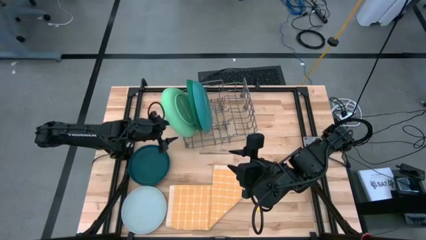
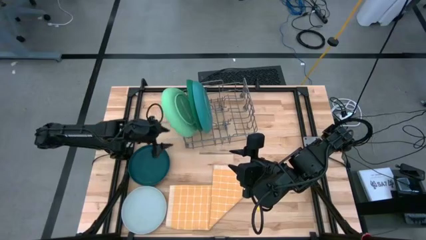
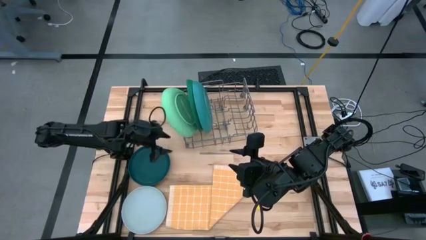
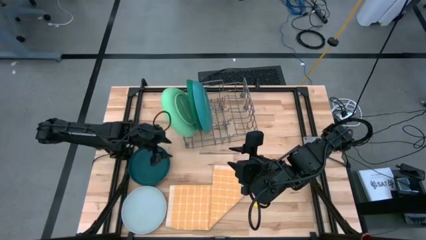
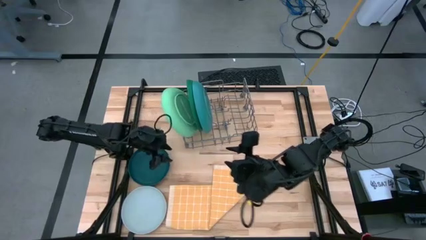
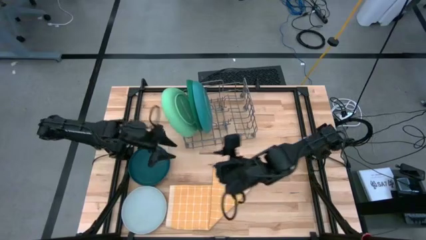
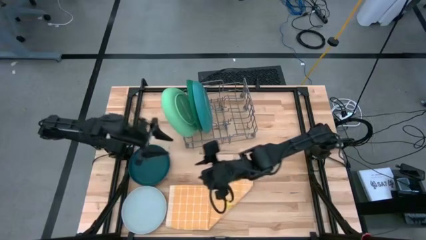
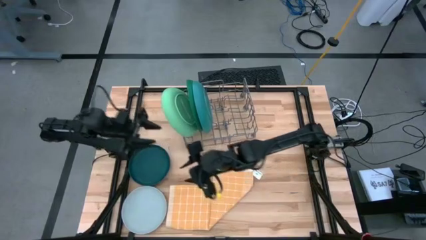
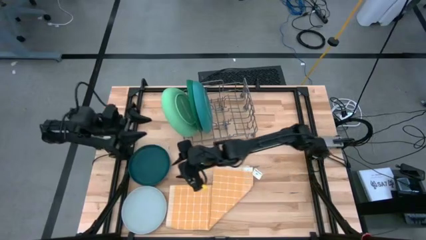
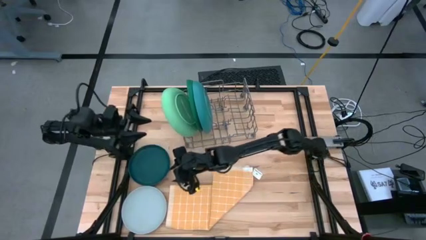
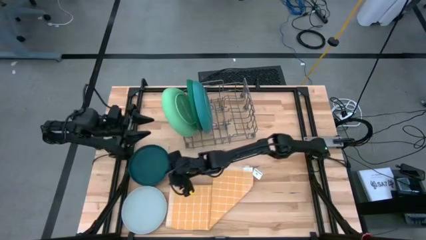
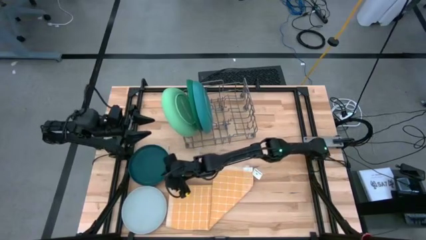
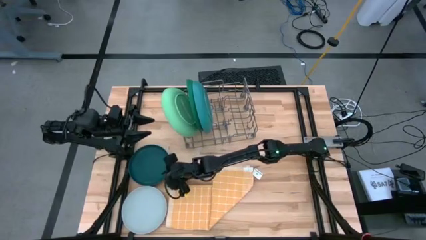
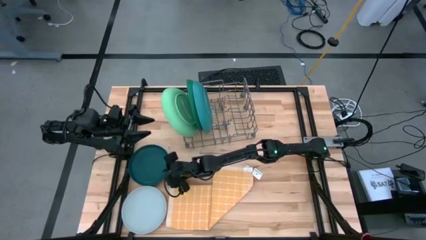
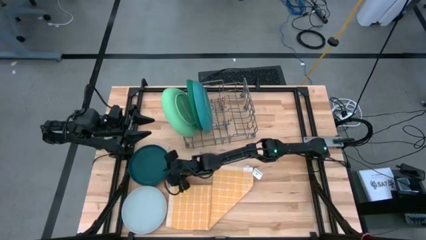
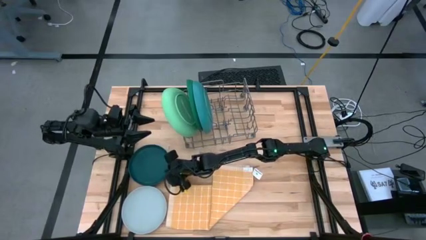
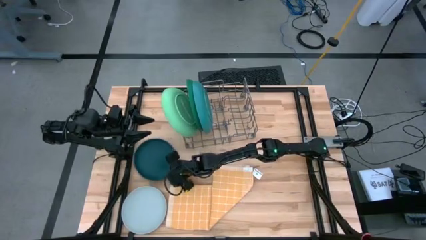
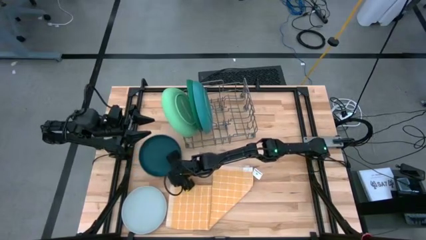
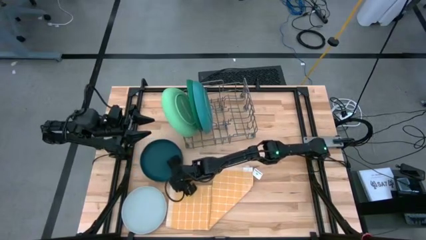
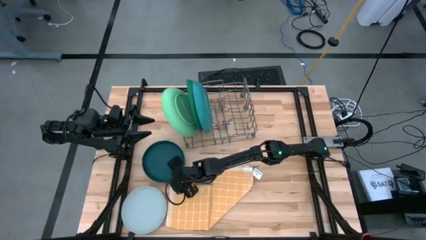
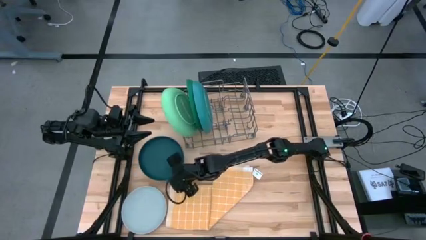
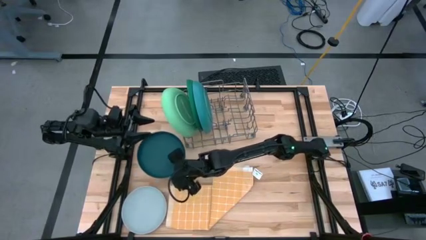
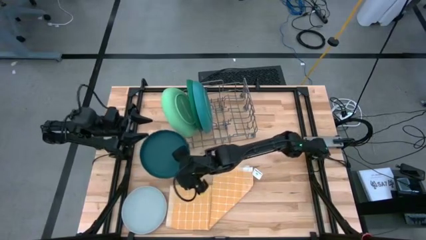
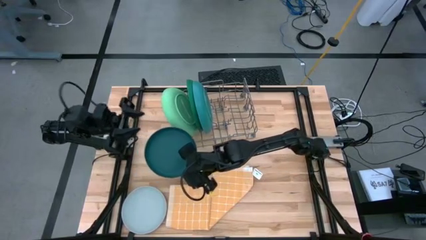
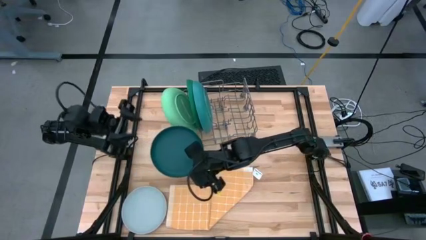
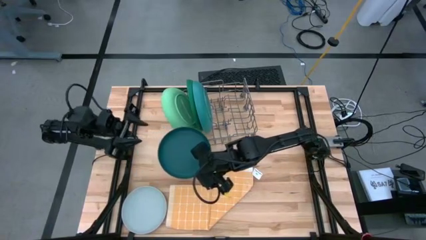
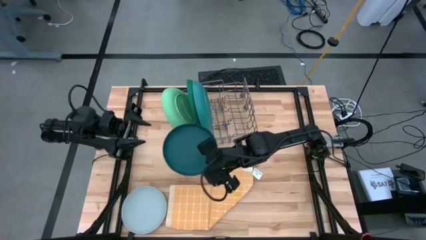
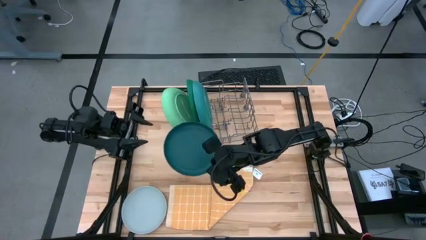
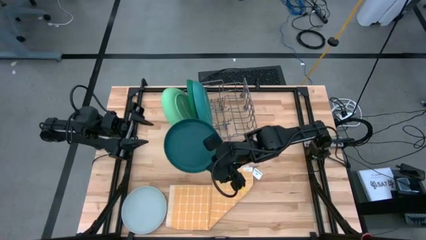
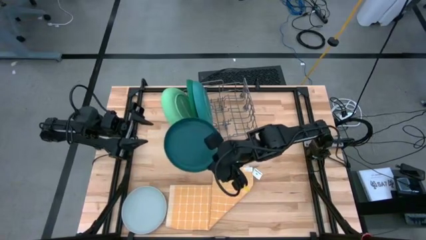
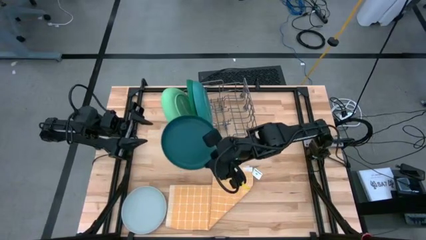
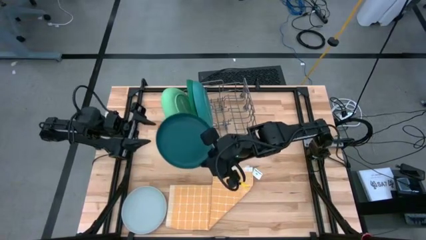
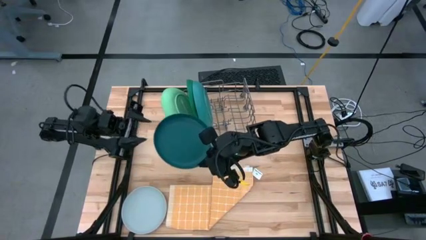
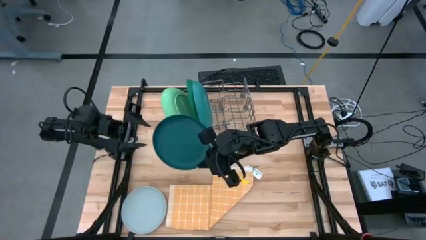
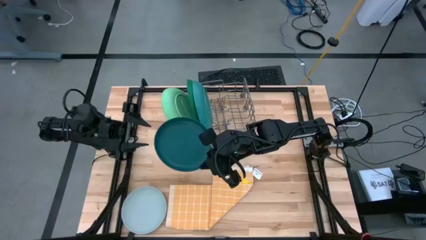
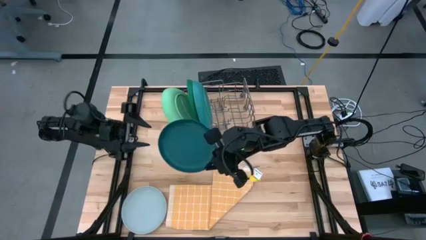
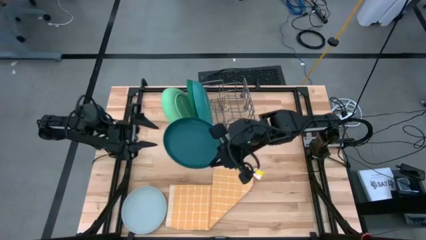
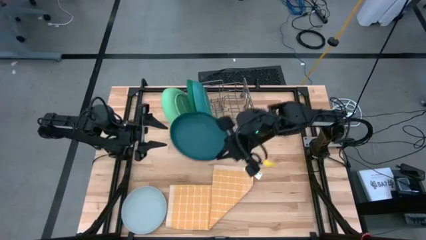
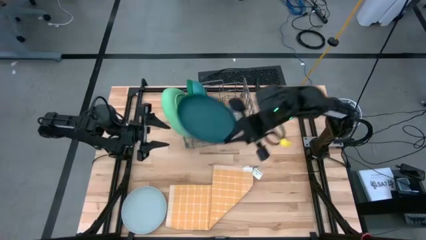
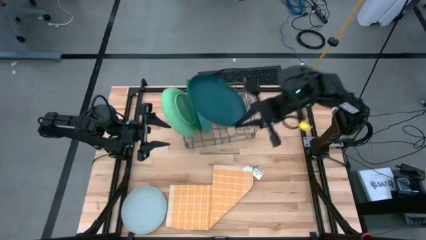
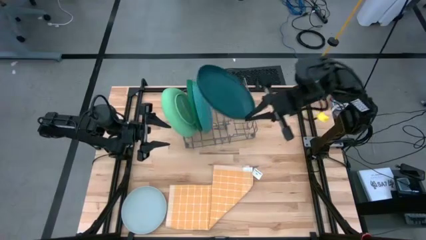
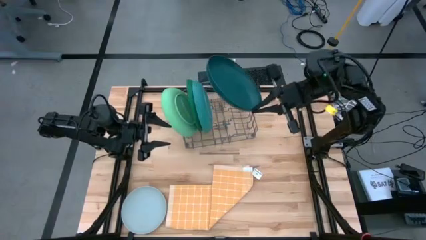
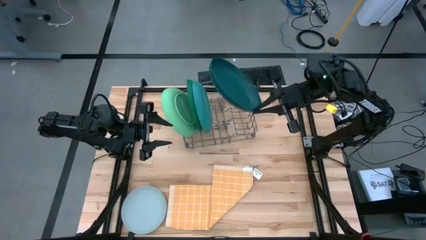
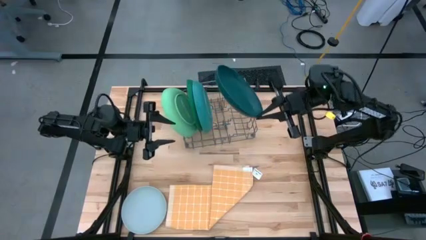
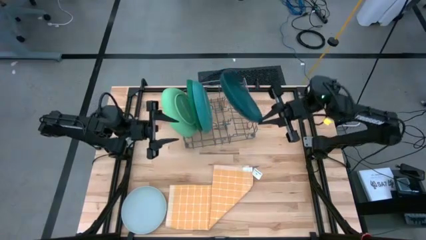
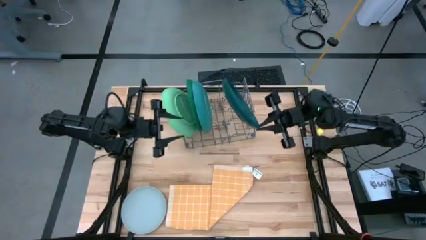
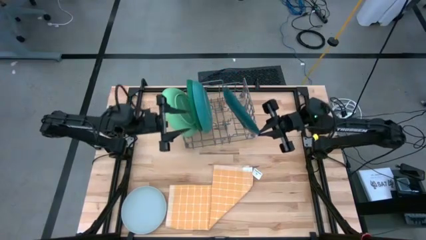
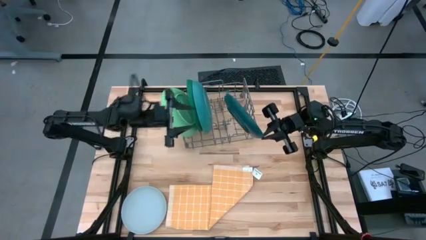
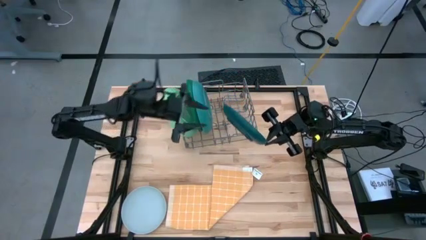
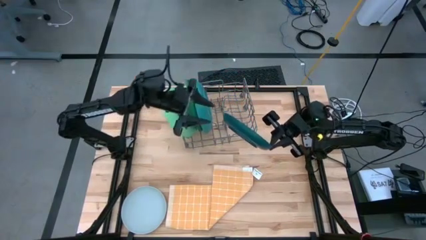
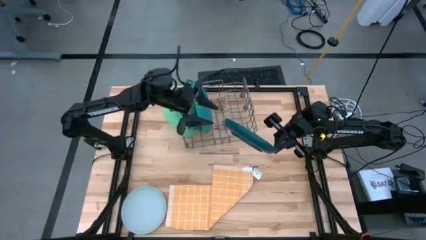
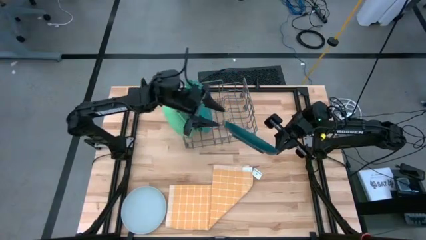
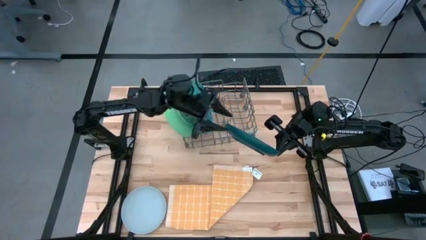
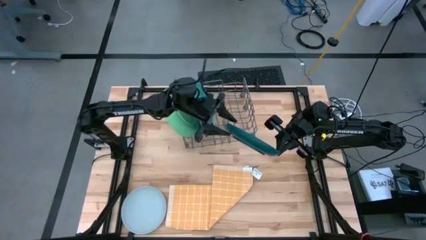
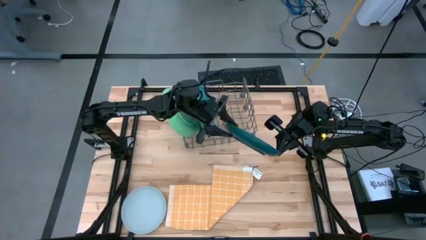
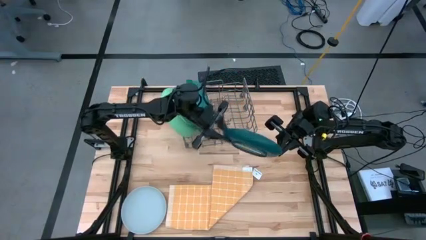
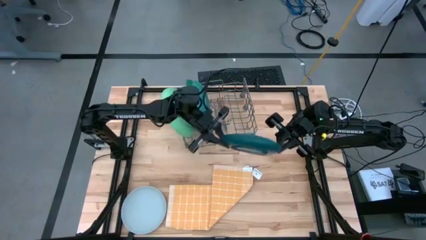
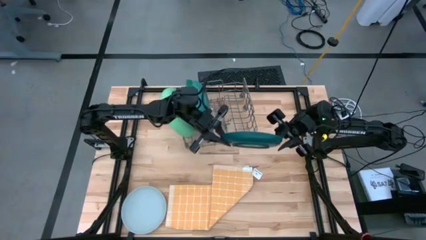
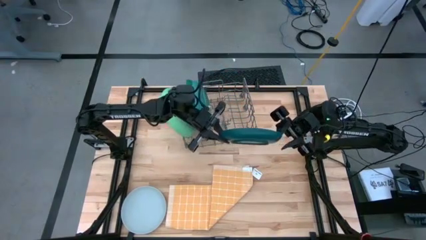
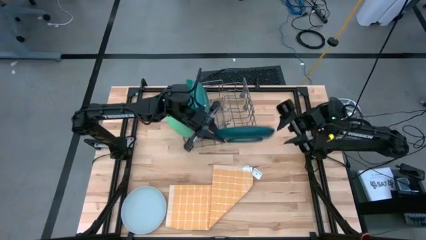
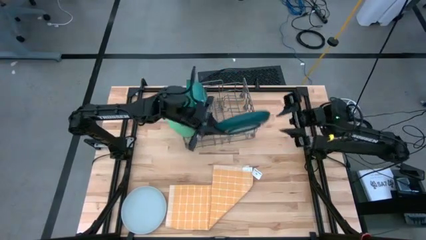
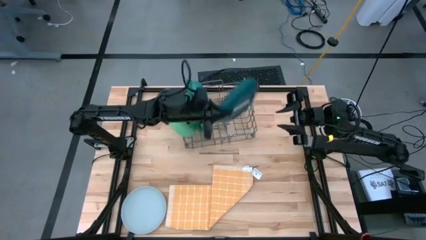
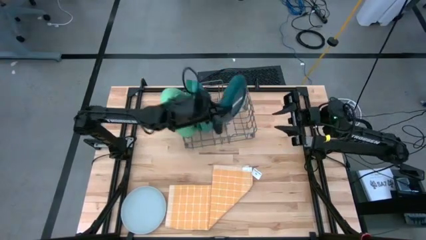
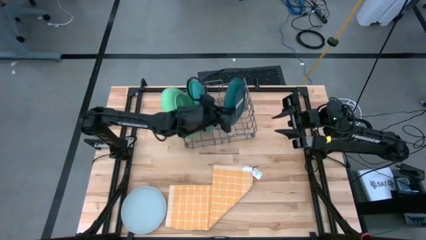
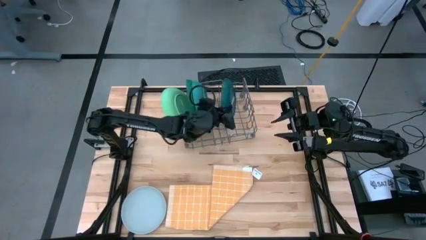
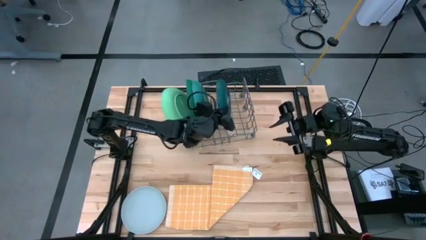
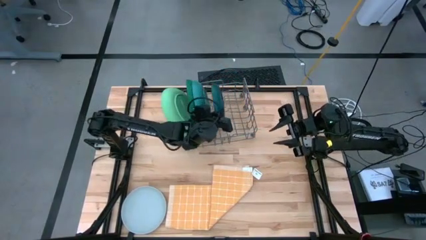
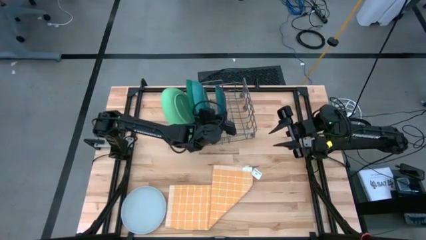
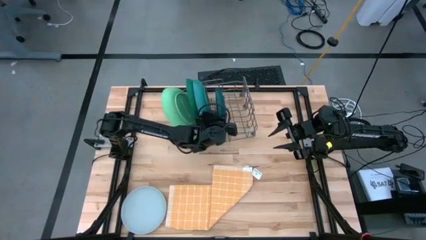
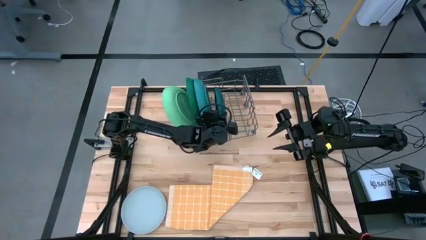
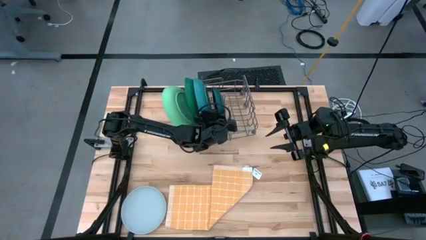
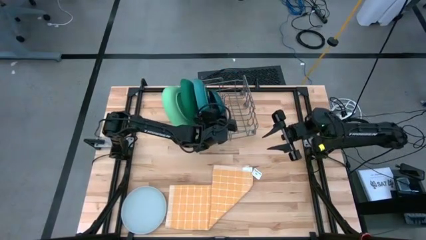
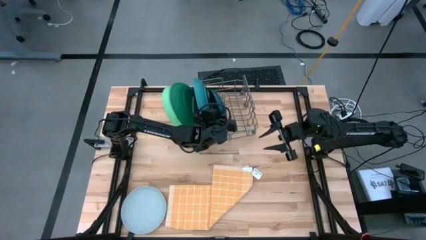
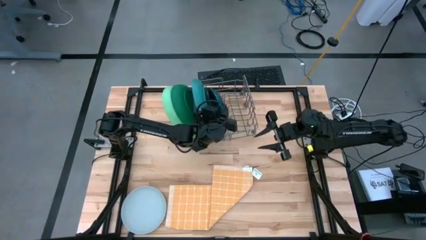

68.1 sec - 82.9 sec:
Task: Sort dishes
Put the dark green plate on the dish rack

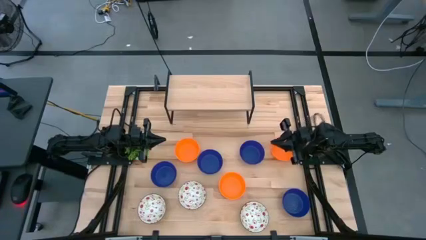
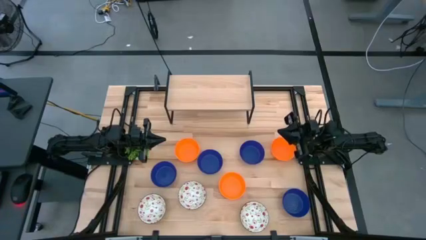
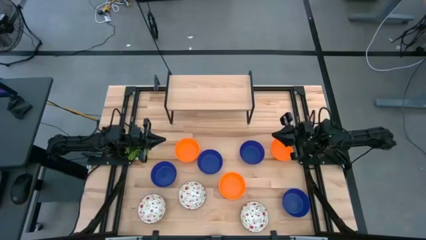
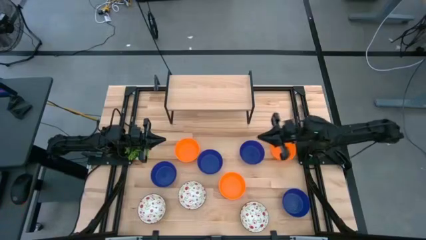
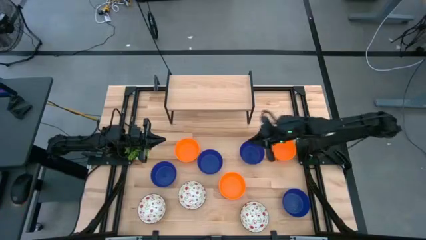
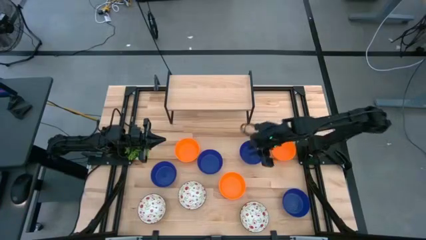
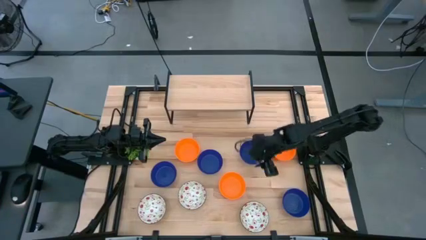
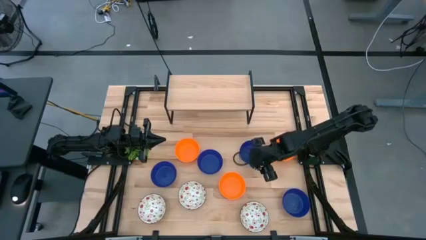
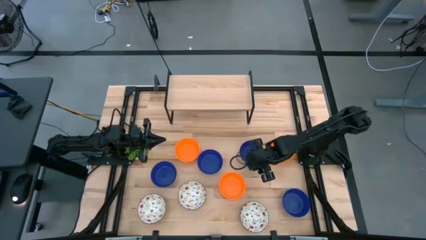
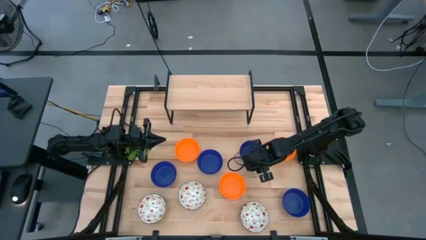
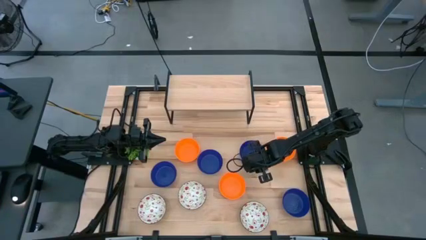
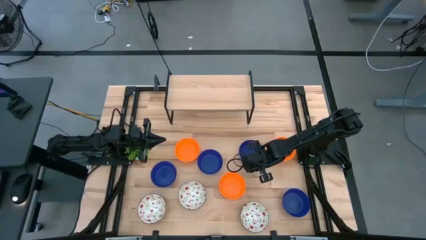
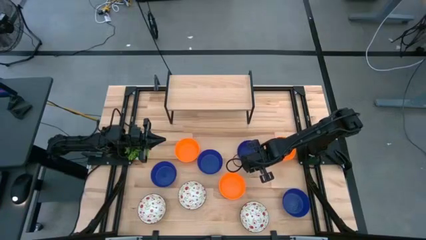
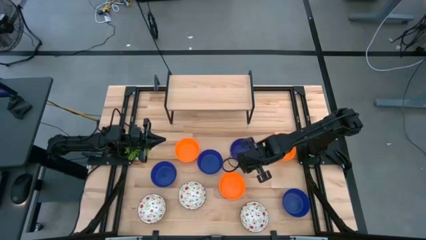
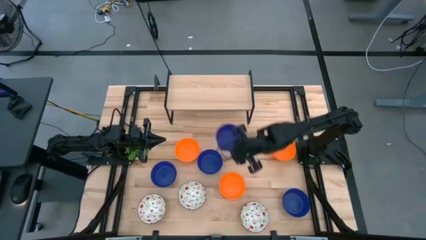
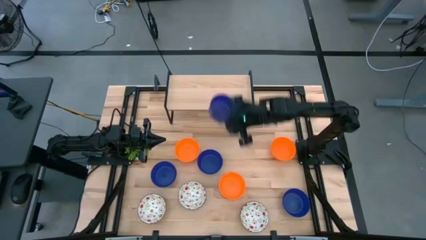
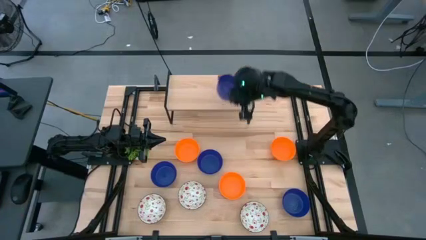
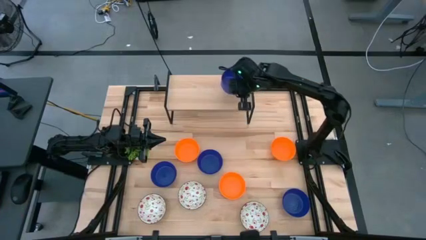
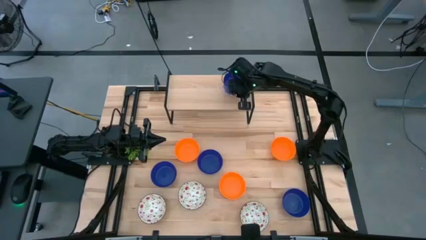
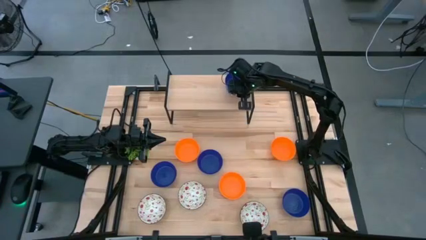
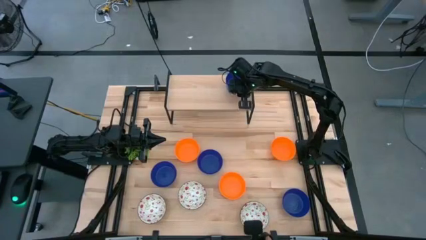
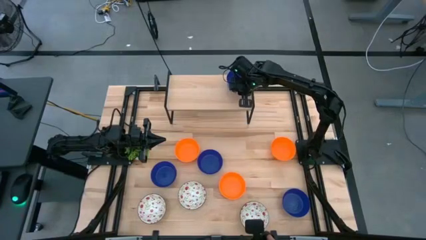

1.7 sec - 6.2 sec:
Task: Pick & Place Mini bowls
Put the blue bowl on the shelf
